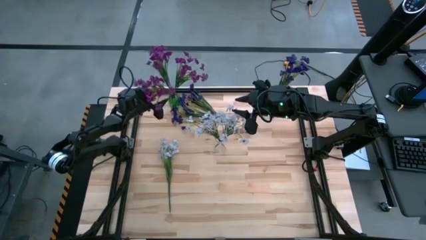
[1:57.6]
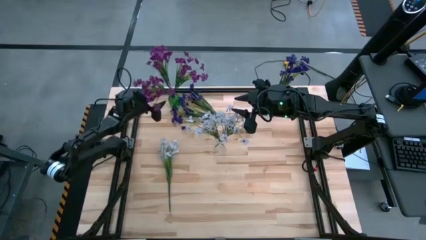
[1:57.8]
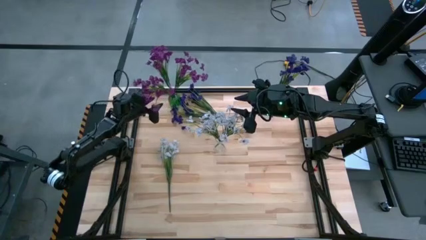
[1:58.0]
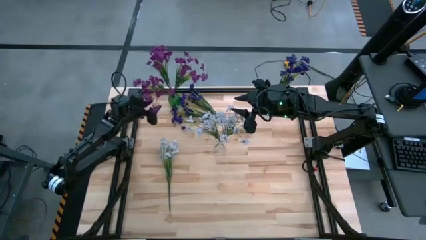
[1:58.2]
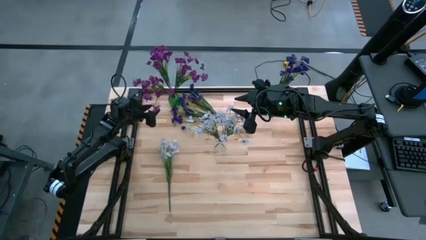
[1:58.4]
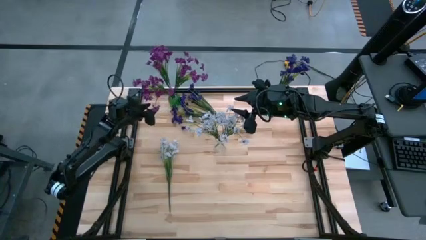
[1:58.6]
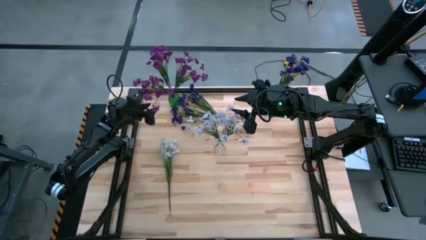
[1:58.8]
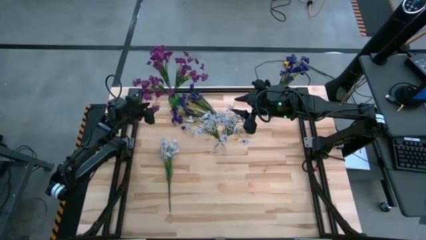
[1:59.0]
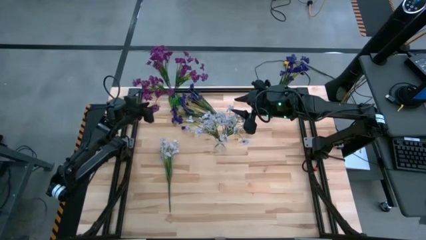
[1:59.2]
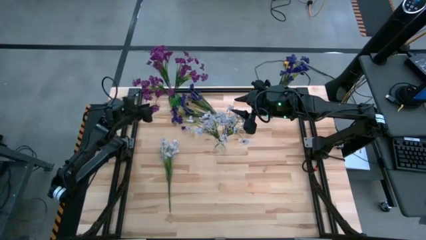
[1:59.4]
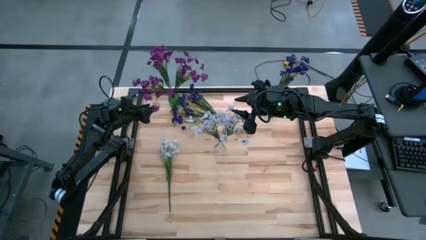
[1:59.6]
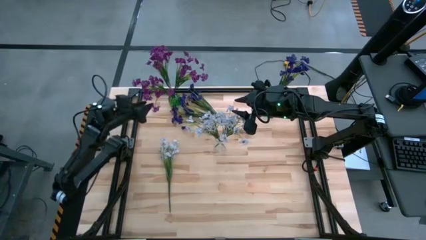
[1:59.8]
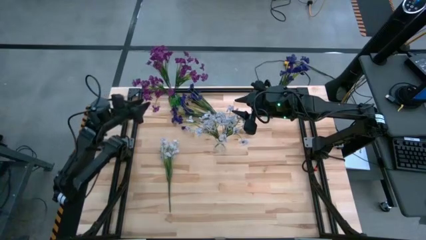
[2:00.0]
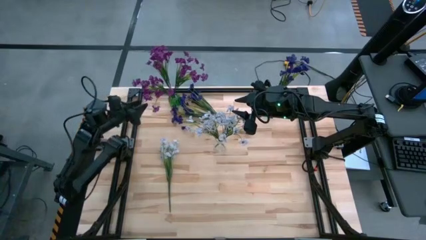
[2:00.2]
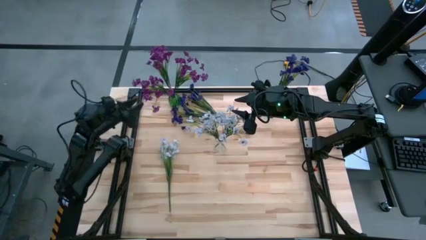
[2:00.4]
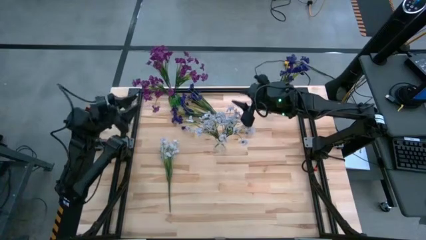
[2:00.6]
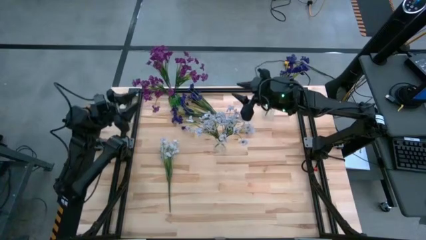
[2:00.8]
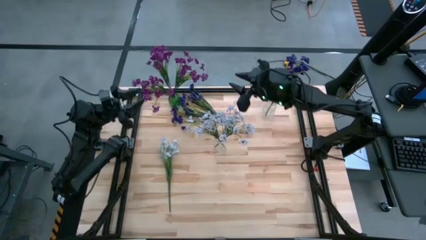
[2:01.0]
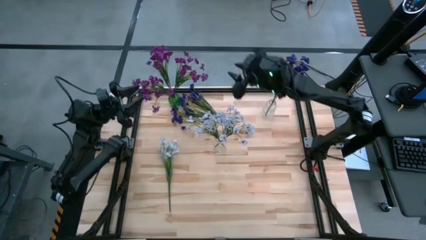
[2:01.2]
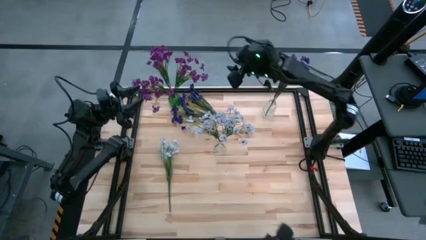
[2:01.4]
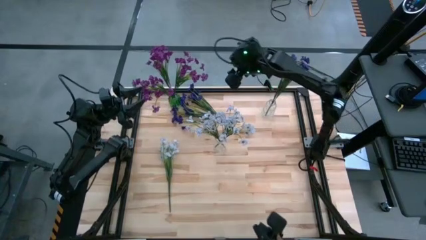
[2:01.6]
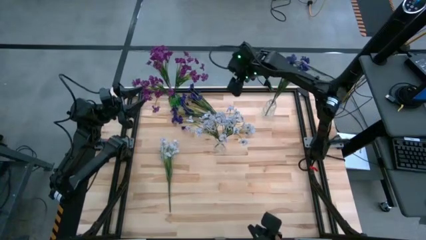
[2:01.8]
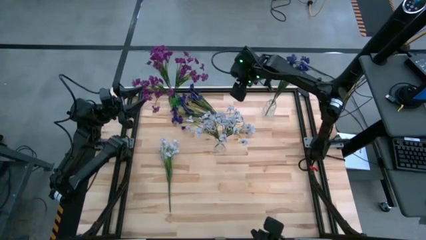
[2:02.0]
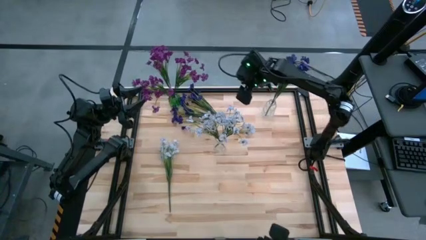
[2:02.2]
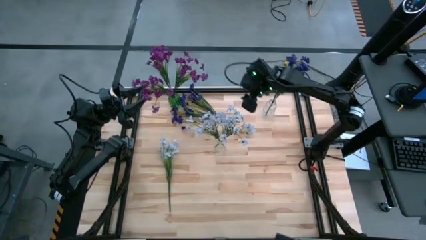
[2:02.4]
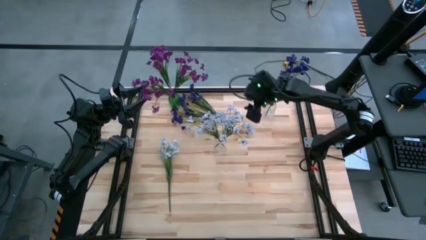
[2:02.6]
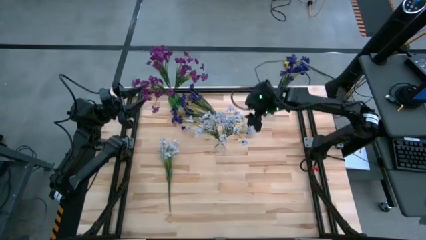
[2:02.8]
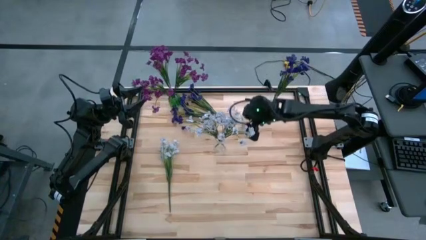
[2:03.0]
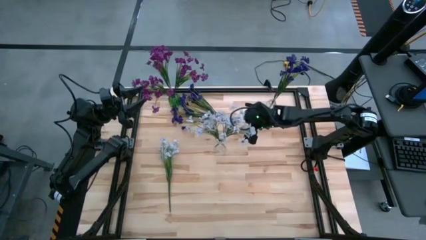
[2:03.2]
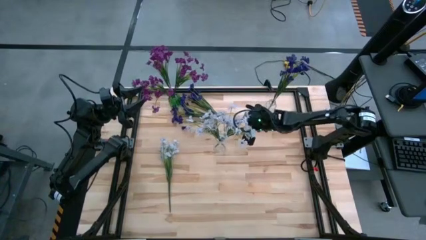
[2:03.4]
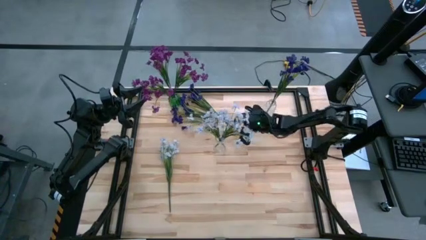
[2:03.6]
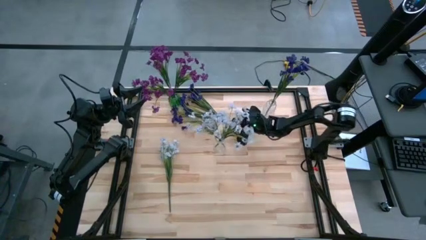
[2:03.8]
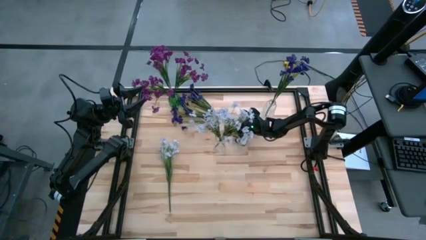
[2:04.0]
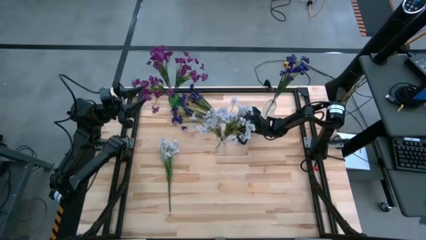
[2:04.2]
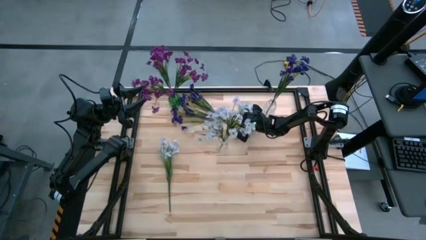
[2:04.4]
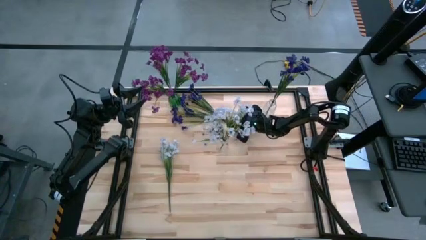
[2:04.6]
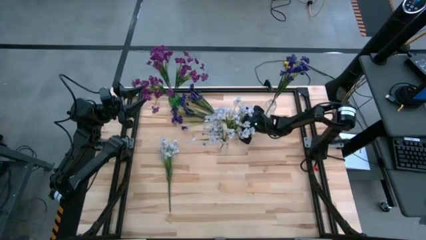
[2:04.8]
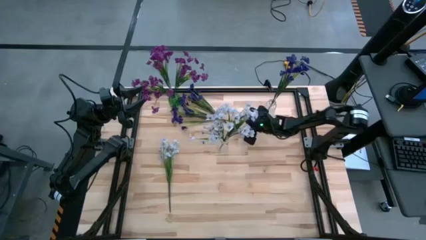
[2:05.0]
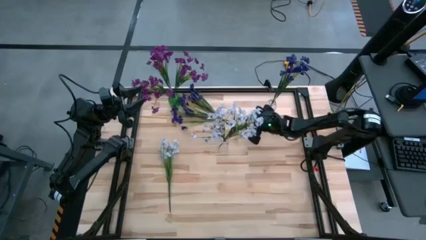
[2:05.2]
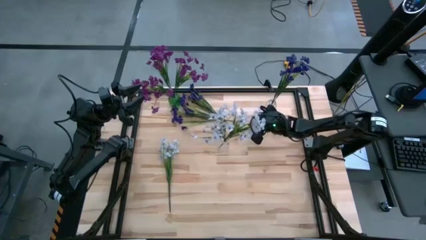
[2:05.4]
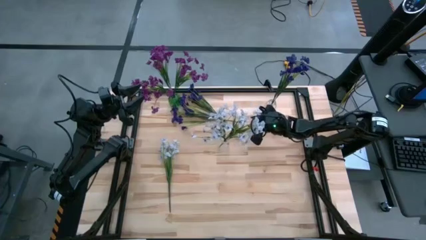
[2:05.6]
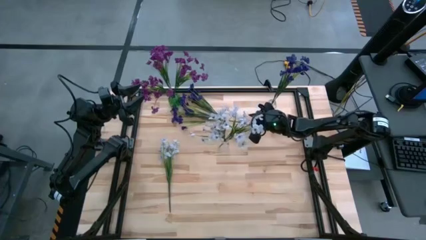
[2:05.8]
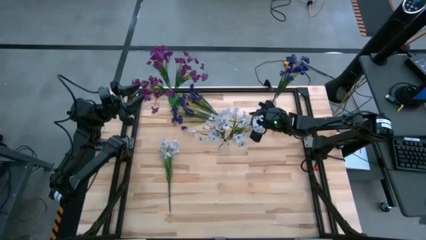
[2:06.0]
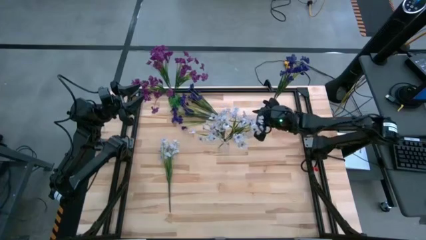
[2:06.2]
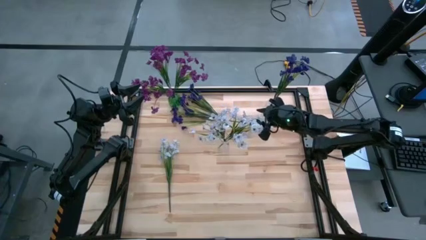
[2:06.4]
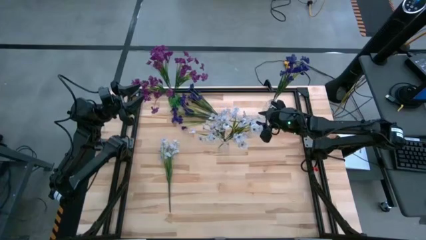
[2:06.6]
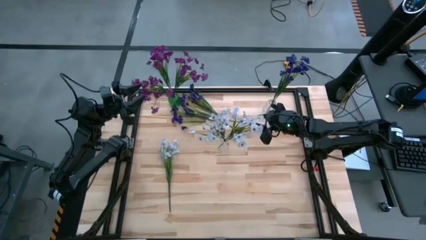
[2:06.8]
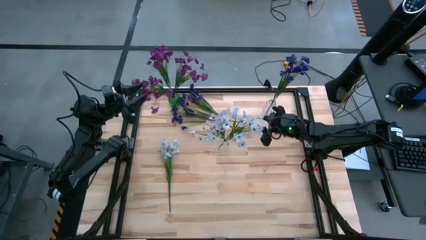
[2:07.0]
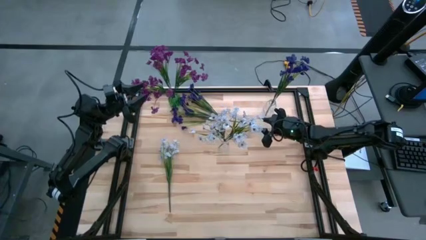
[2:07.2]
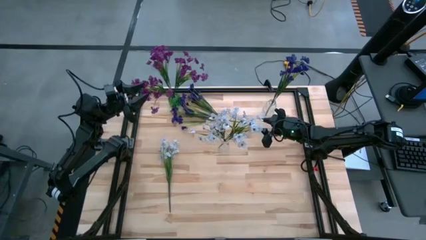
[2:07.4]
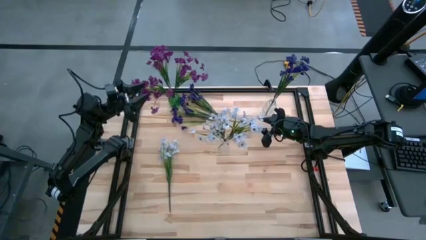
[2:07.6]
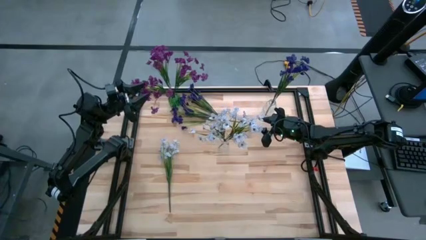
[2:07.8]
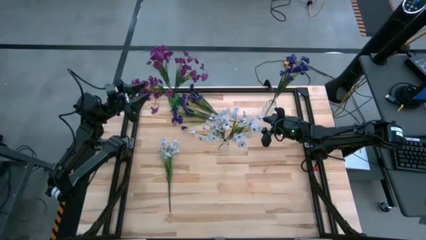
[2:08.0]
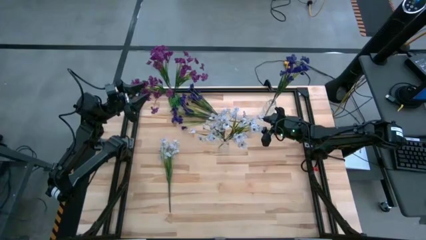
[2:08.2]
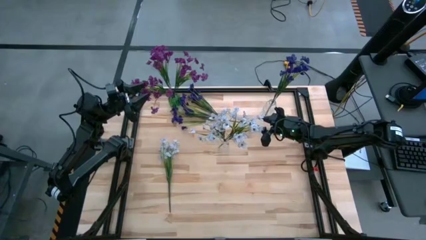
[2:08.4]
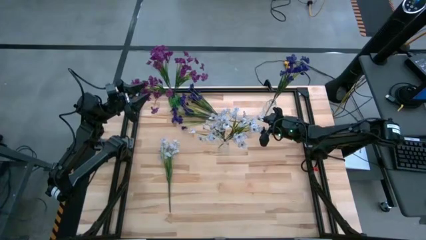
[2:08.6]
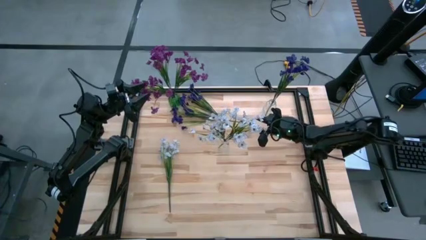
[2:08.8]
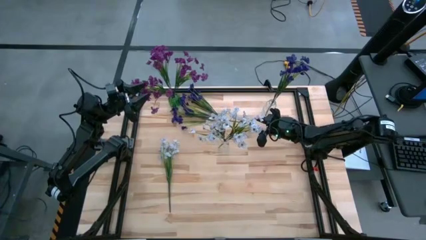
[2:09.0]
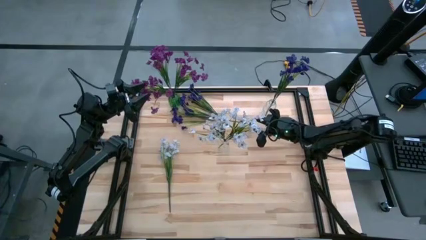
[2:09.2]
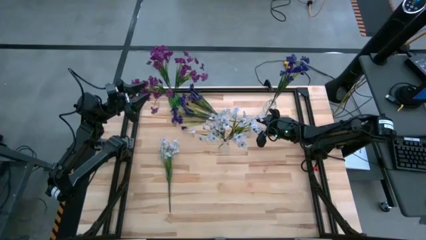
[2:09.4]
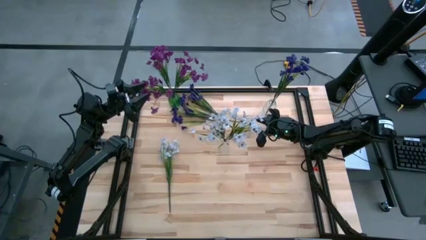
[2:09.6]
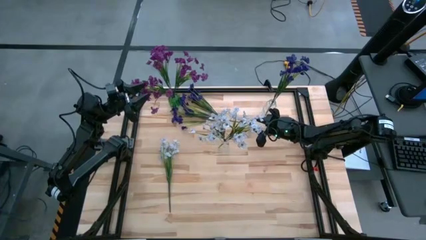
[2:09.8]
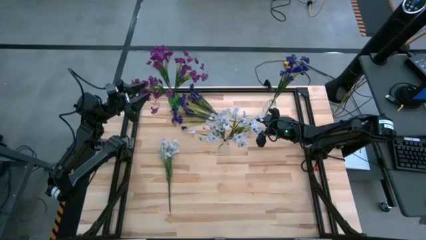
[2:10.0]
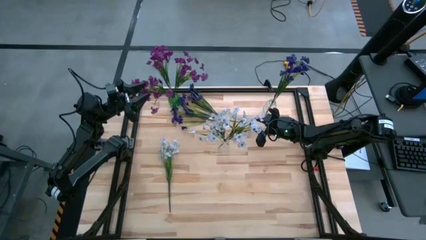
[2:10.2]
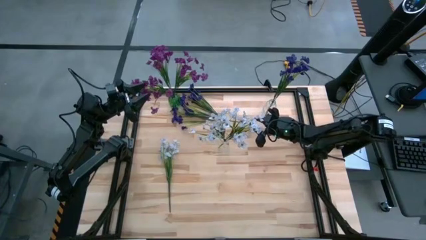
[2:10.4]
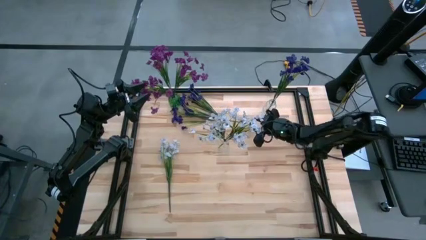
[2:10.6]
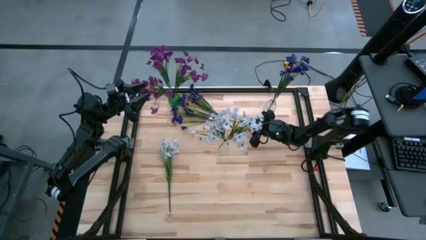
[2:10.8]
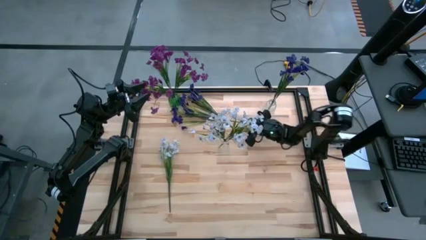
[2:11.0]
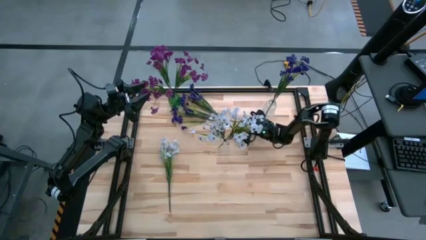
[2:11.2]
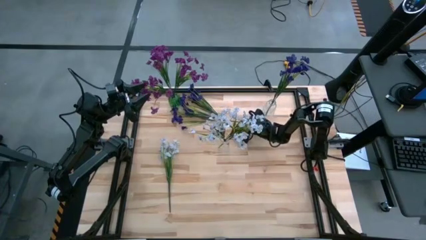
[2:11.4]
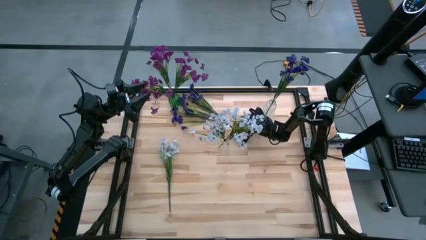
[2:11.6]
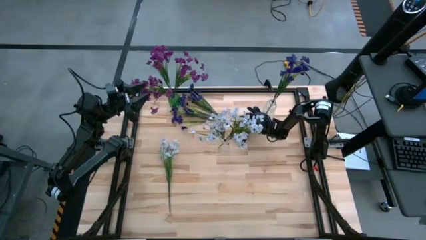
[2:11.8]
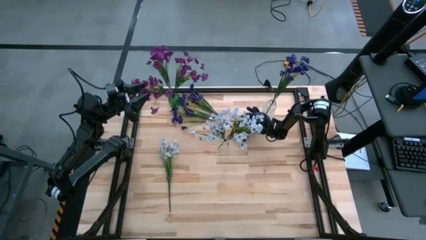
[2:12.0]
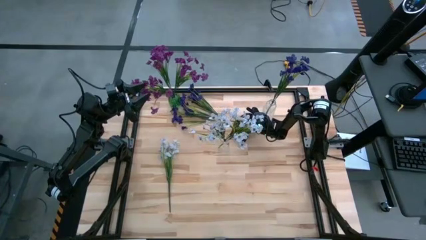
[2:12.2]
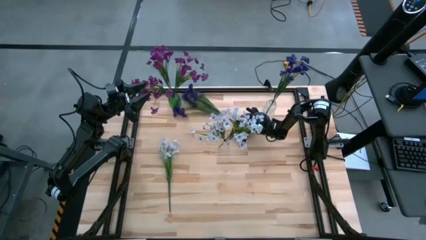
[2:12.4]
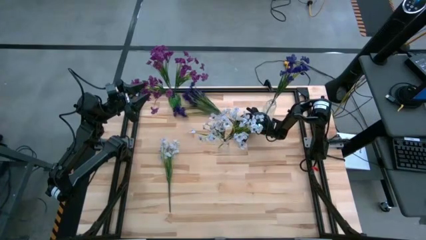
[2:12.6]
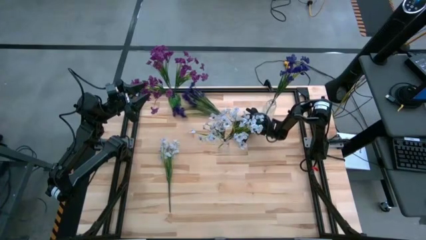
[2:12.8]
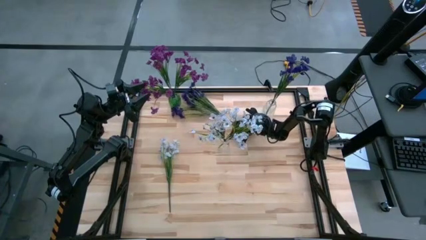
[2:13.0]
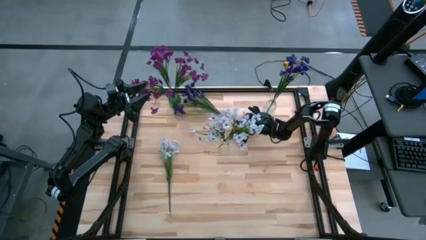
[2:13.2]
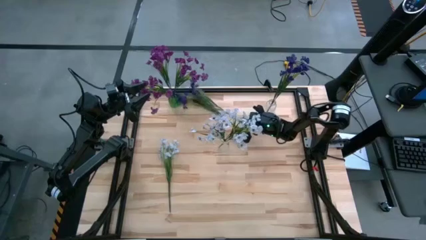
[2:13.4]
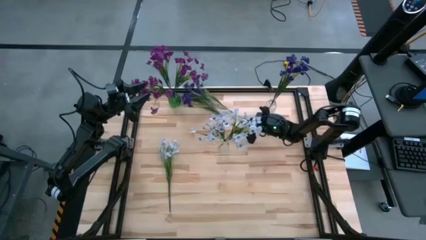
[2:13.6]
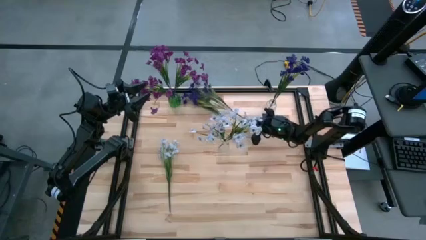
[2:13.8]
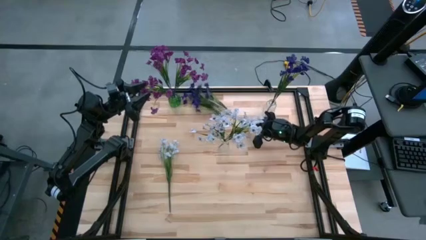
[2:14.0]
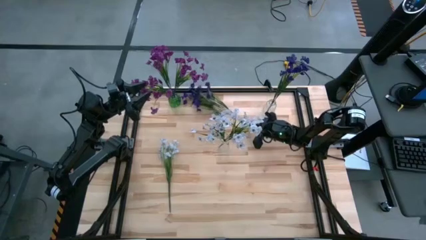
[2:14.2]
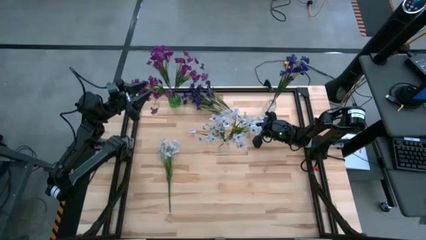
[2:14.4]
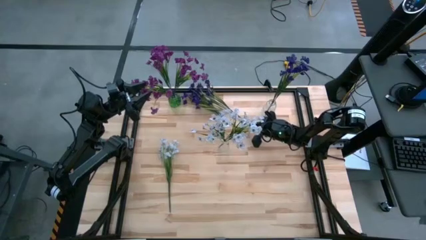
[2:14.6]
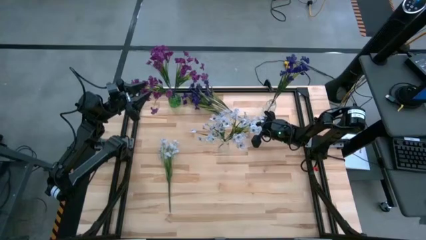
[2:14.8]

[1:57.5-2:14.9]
Task: Sort flowers into vase by color
Put the bottom blue flowers into the top transparent flower vase
